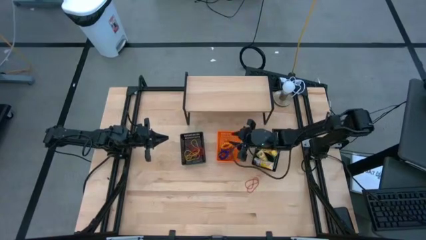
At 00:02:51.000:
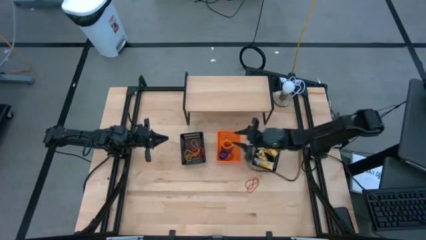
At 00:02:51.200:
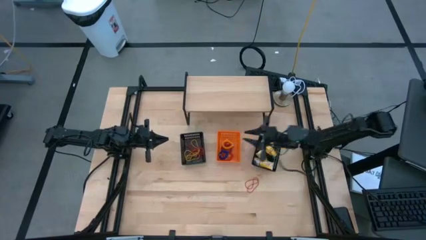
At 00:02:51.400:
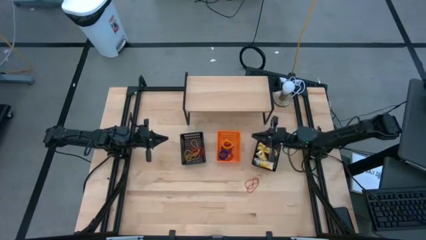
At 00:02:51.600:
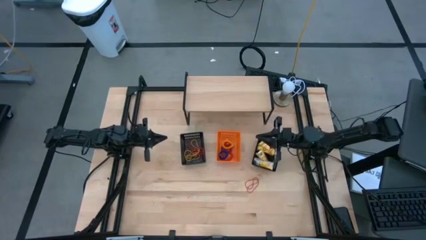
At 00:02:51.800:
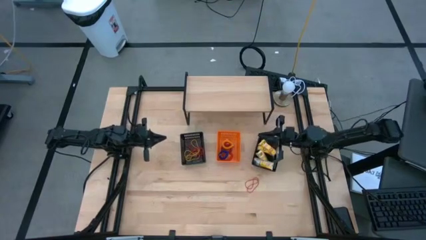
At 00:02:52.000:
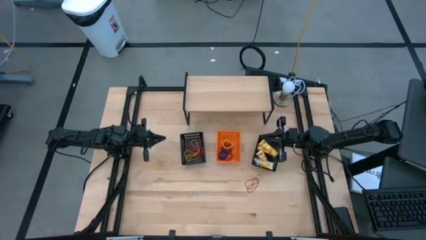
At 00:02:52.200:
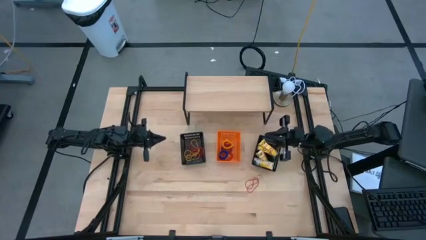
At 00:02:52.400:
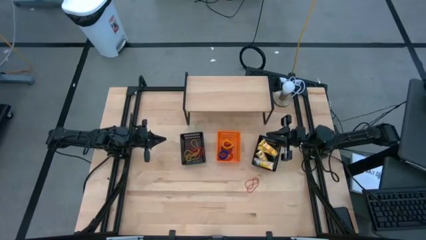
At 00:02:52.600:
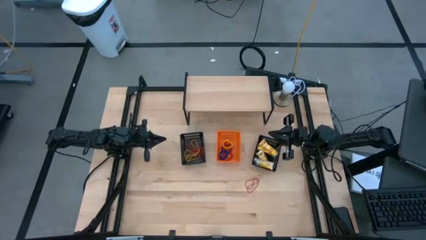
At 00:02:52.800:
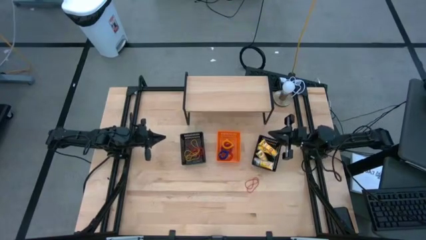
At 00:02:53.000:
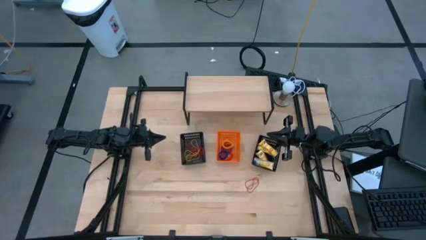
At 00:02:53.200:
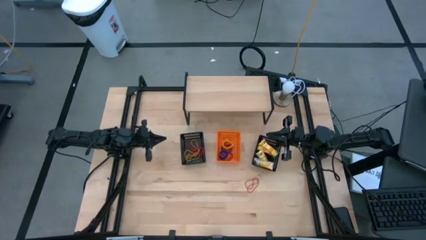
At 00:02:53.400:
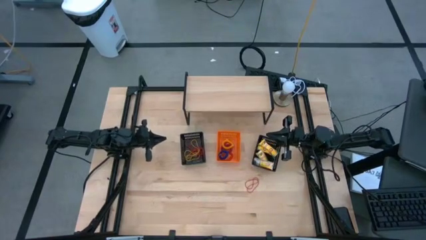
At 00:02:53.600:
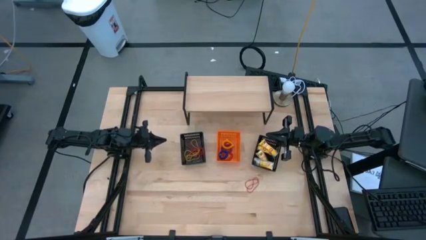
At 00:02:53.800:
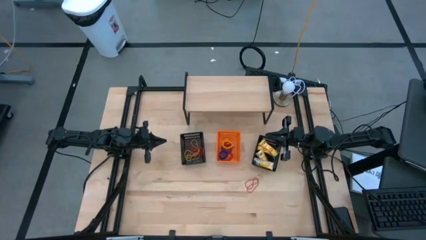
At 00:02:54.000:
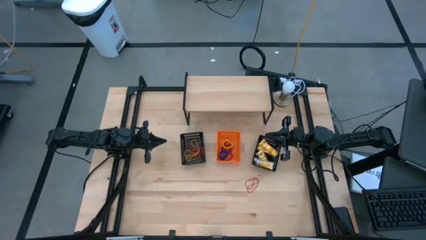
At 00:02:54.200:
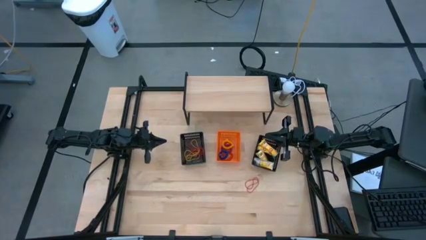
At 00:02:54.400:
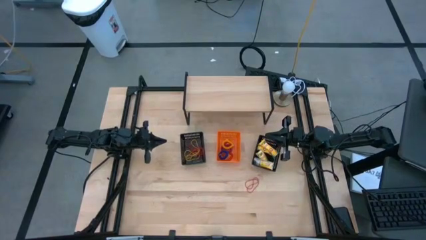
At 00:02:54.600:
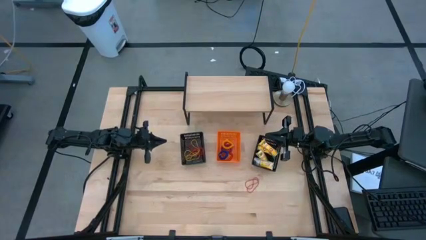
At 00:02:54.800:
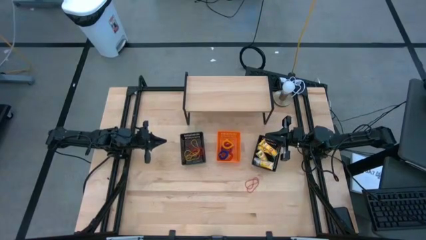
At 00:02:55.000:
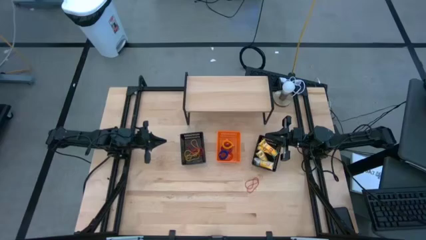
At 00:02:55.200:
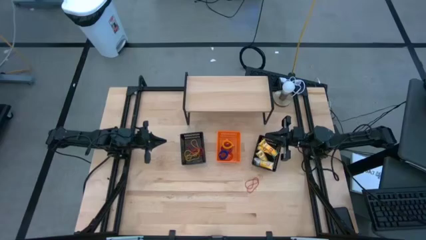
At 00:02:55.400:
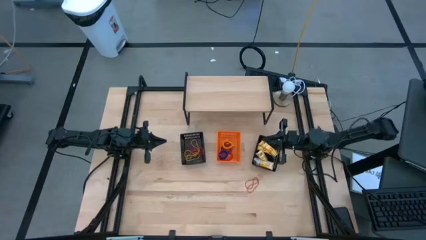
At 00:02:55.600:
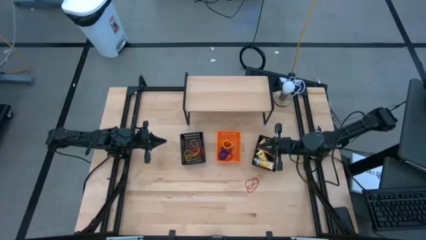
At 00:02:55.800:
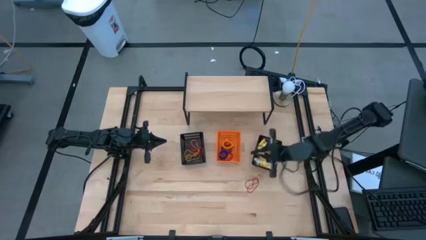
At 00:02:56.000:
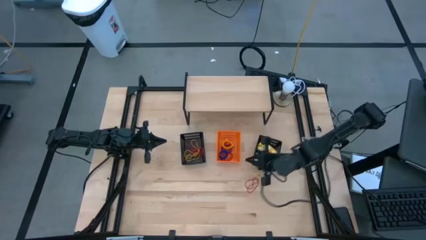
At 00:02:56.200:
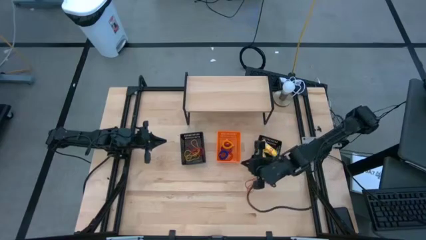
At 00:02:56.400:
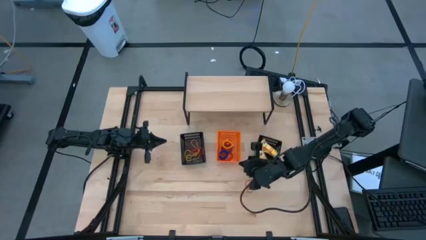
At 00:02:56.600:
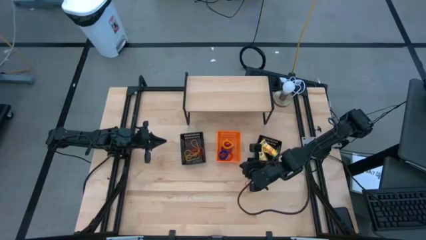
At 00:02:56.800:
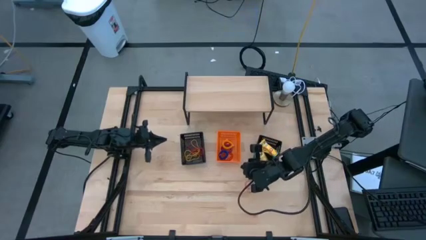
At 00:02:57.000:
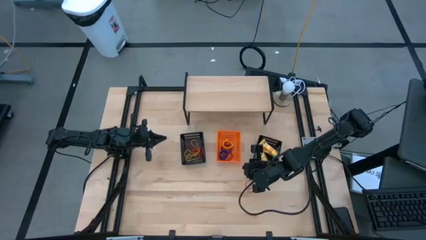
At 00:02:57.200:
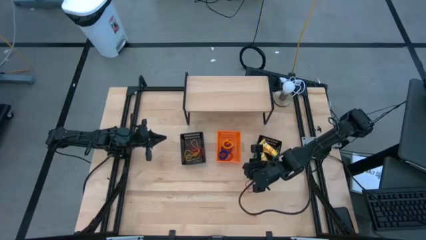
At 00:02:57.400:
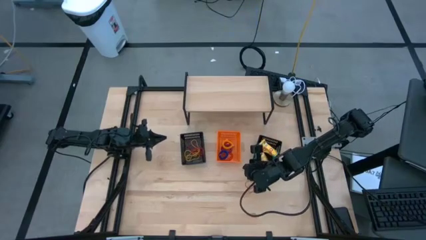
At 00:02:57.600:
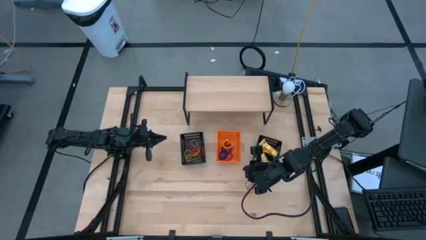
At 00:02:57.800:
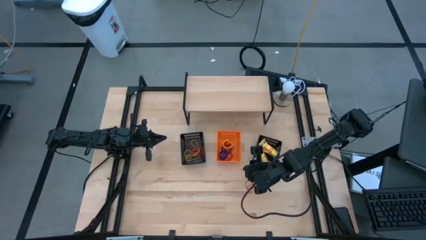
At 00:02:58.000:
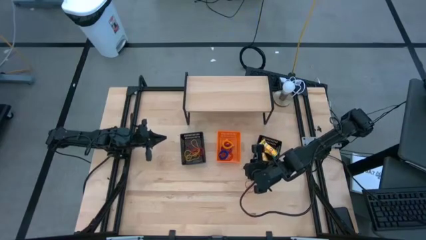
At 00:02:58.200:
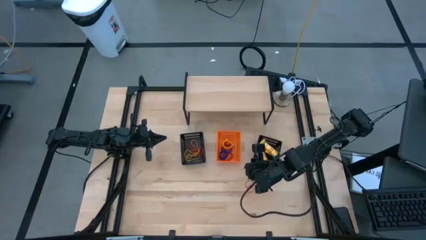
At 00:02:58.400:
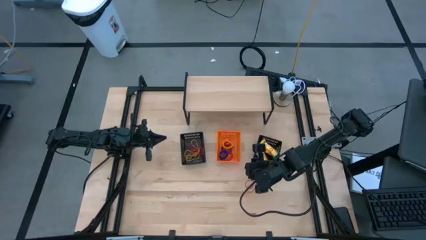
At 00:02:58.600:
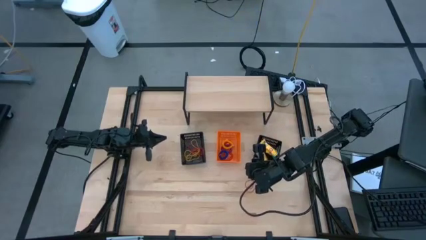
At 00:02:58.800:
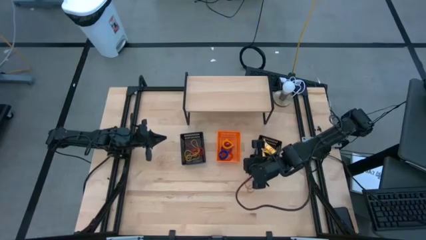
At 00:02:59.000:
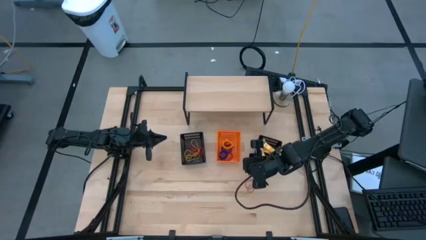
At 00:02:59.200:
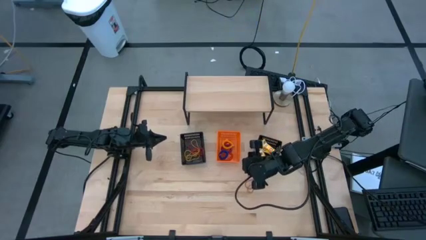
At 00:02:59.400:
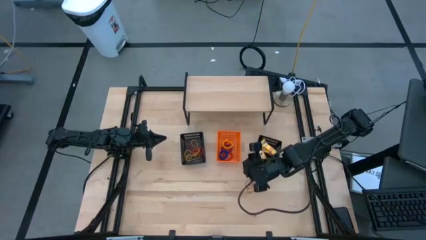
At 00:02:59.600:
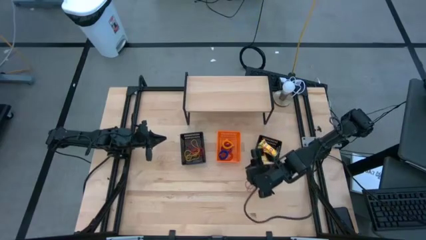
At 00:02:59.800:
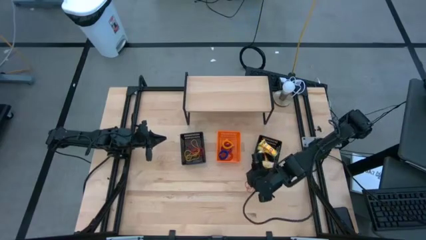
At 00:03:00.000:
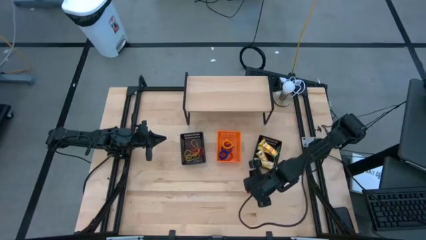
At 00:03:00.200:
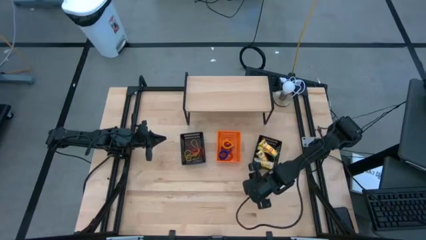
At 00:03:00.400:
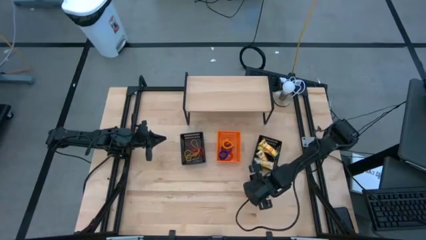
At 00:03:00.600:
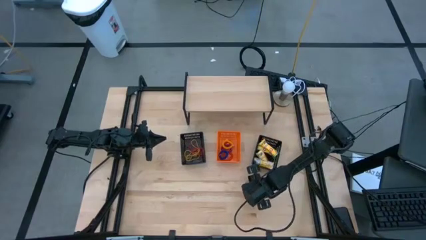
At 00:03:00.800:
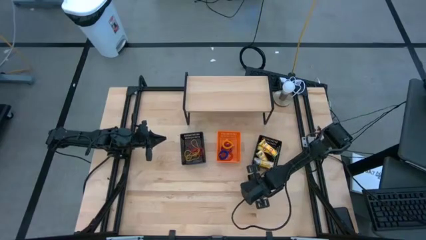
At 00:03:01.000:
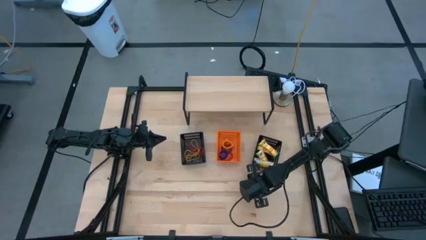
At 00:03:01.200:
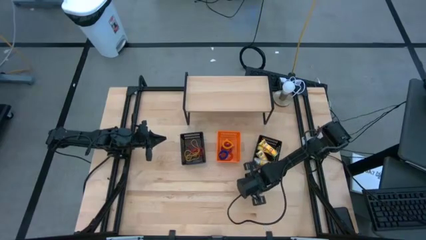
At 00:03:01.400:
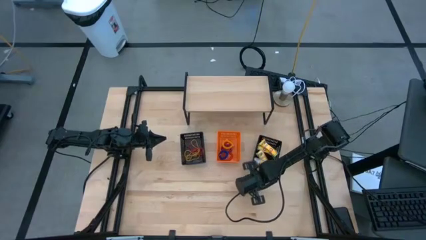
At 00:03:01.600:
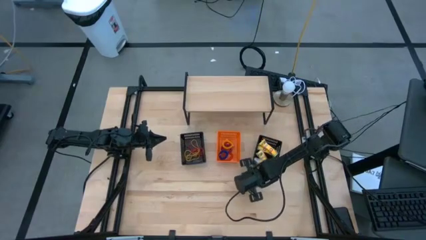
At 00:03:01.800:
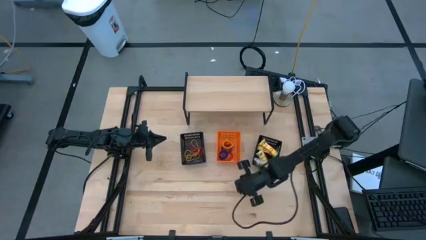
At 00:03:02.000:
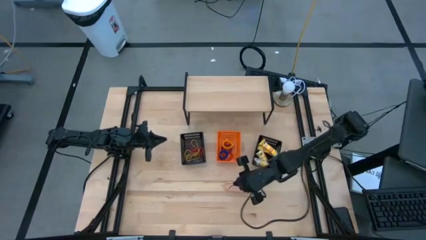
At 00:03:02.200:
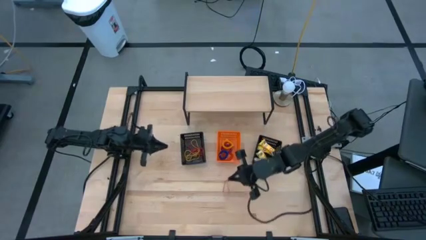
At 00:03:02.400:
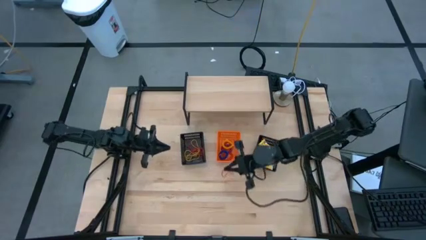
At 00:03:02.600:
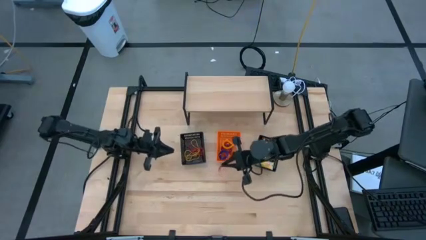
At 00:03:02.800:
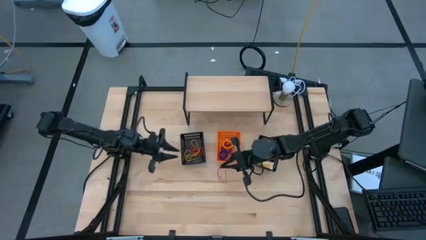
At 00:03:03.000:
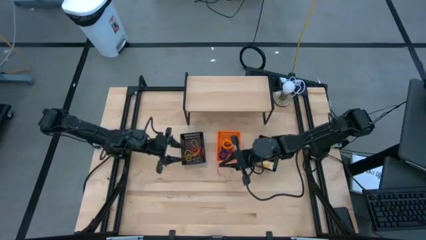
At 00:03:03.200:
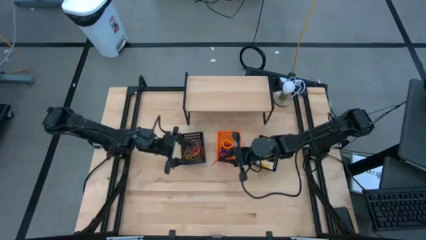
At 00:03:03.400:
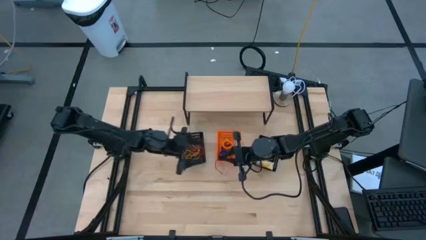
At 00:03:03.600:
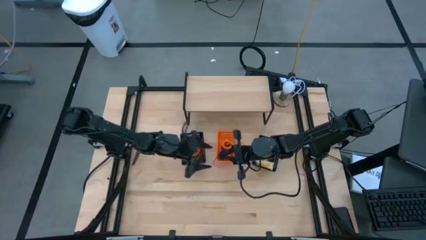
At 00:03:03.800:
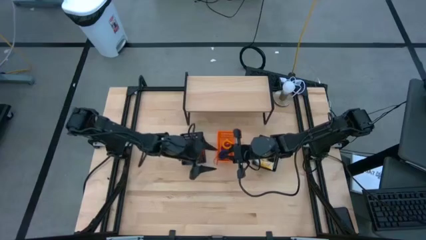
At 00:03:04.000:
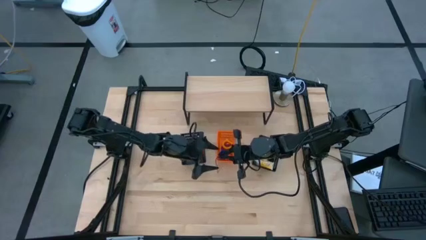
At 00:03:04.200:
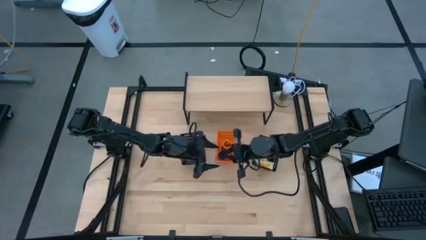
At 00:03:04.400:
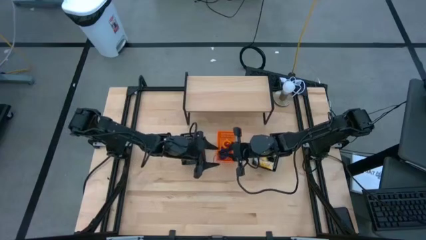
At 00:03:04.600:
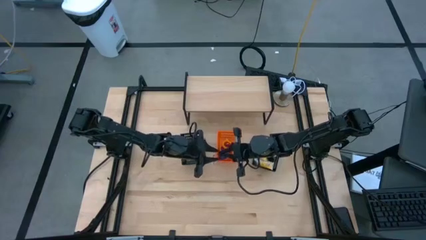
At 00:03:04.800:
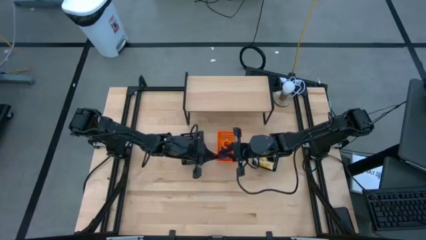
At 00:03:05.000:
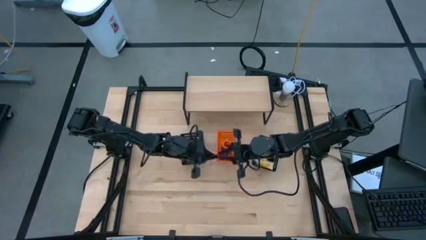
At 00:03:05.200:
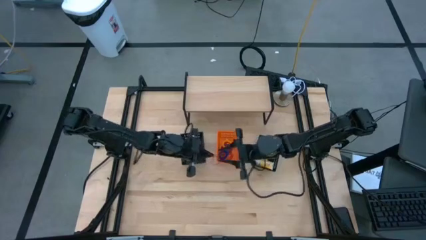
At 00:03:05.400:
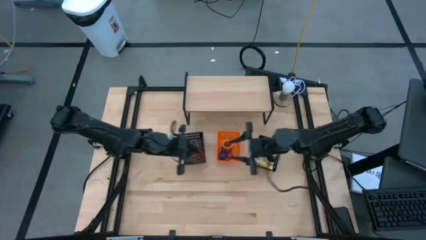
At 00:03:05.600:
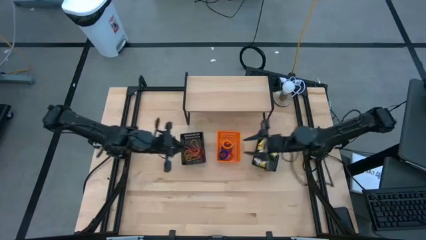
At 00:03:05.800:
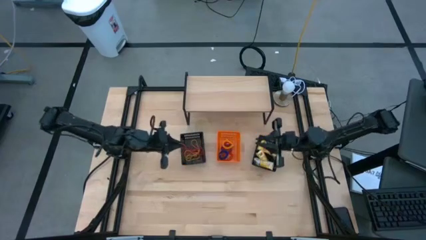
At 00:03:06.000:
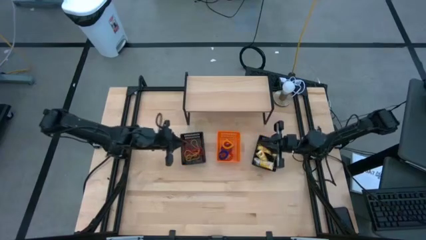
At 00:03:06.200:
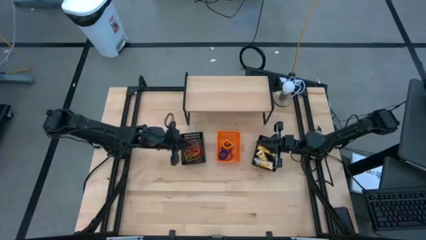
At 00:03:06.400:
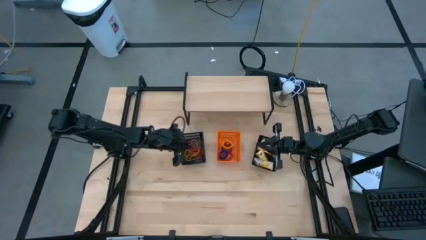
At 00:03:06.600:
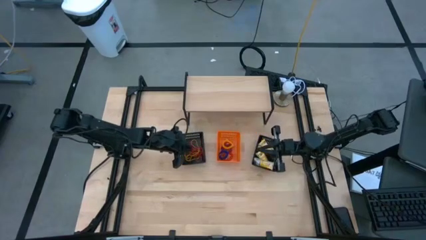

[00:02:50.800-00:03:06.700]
Task: Pick & Place Office Desk Supplies
Put the red rubber band into the left black bin
